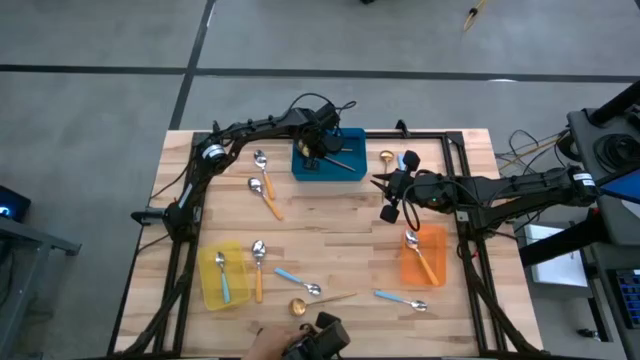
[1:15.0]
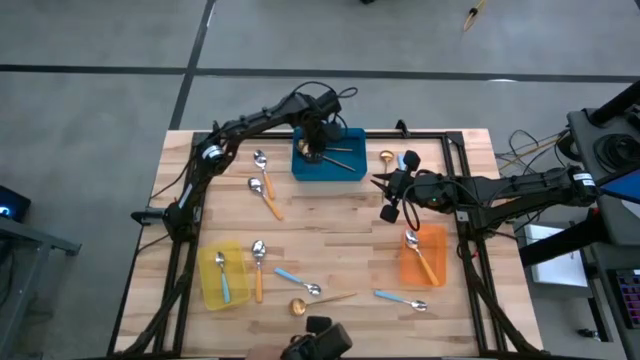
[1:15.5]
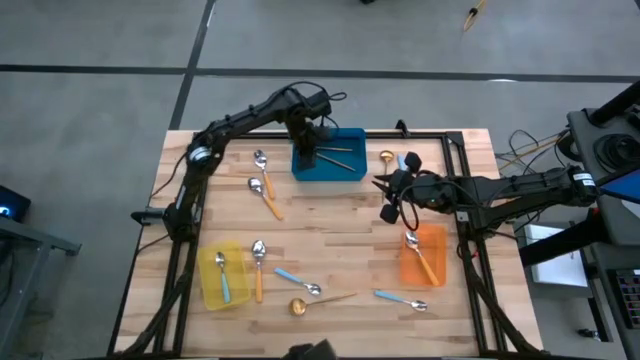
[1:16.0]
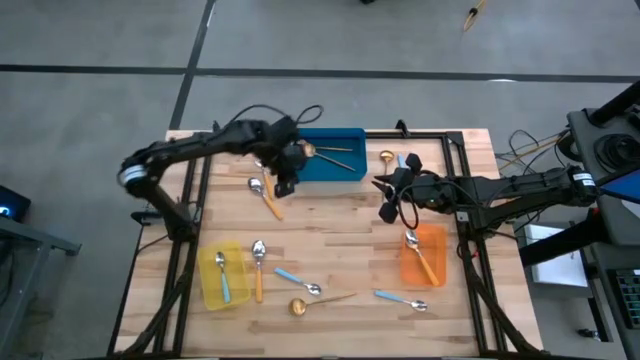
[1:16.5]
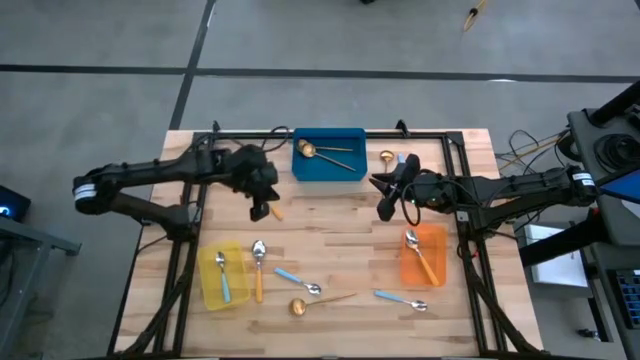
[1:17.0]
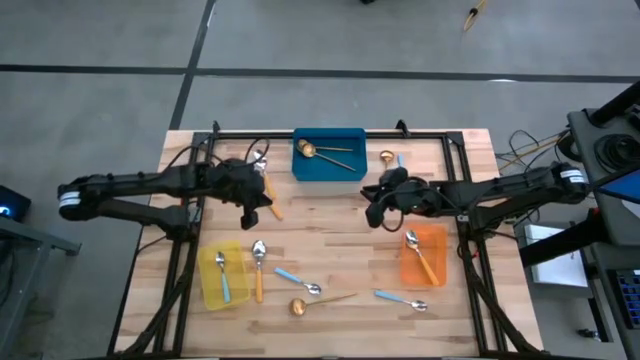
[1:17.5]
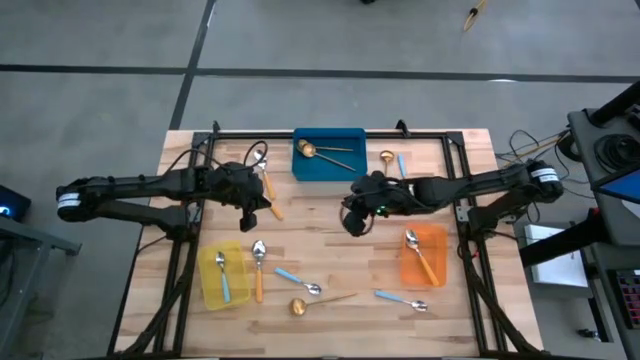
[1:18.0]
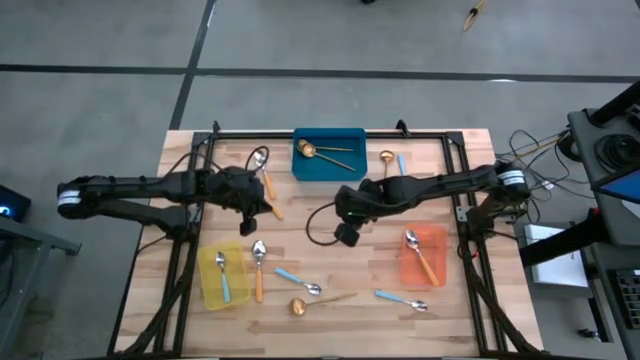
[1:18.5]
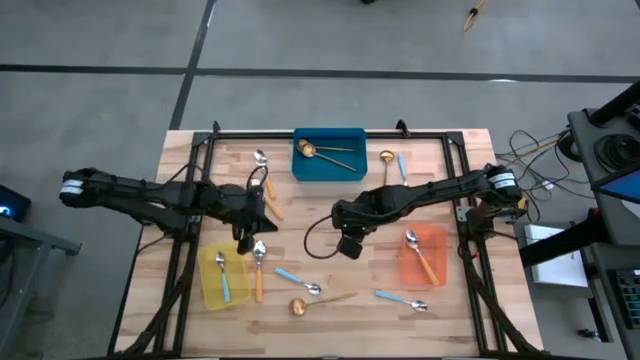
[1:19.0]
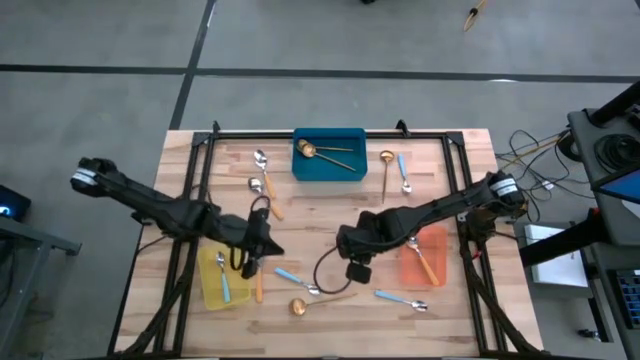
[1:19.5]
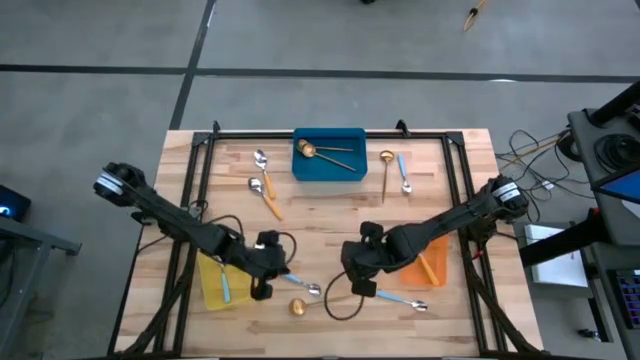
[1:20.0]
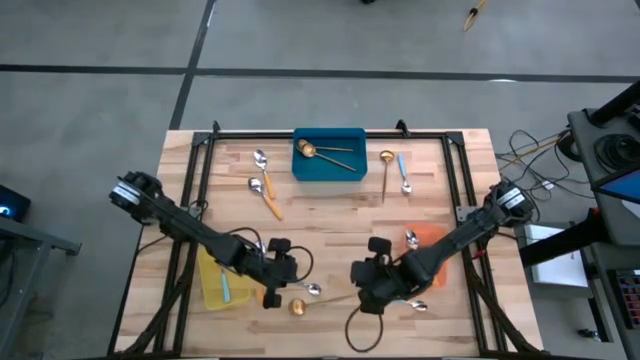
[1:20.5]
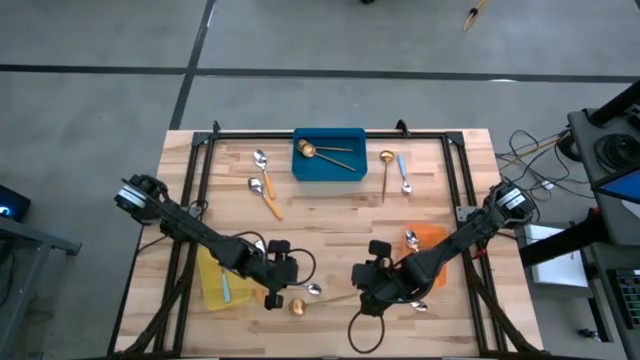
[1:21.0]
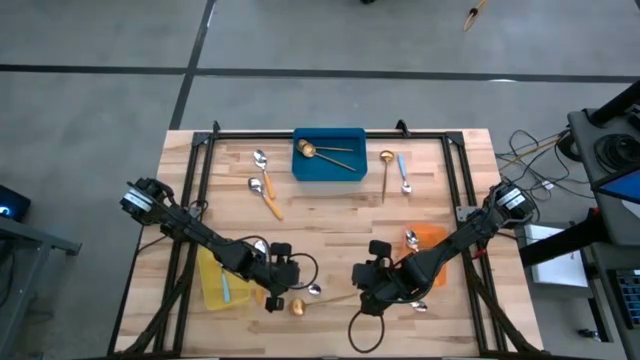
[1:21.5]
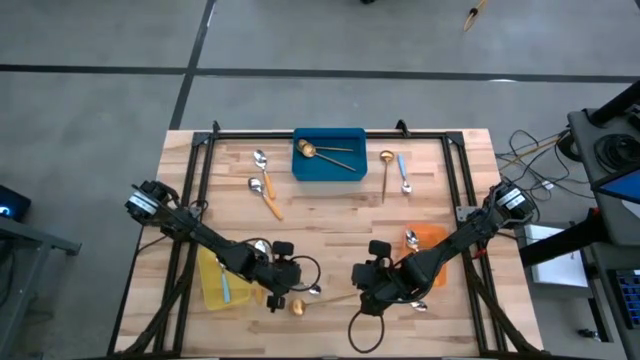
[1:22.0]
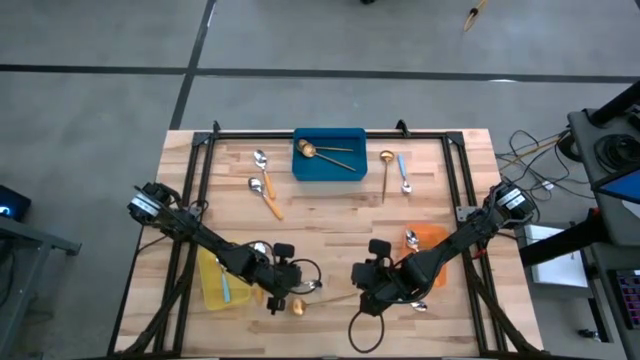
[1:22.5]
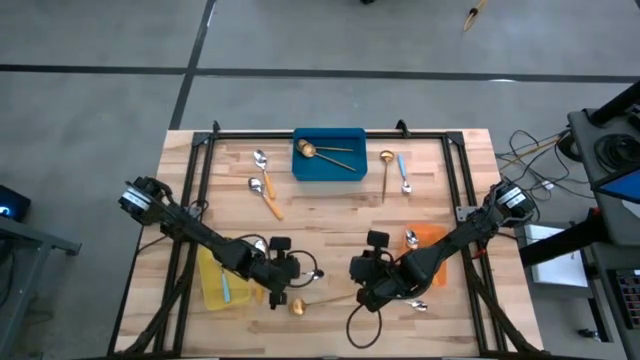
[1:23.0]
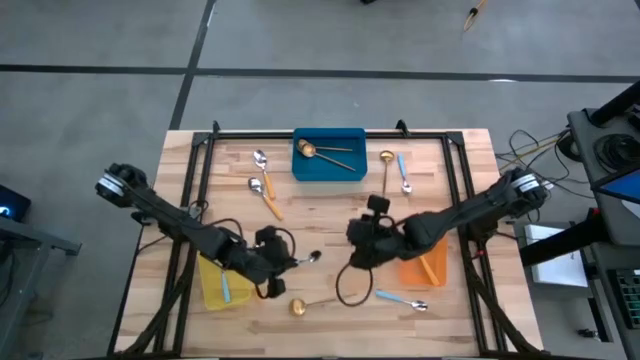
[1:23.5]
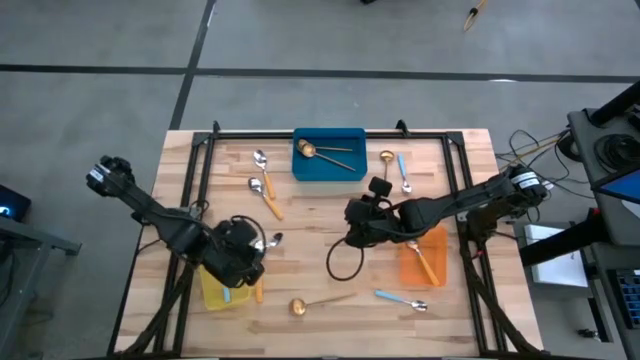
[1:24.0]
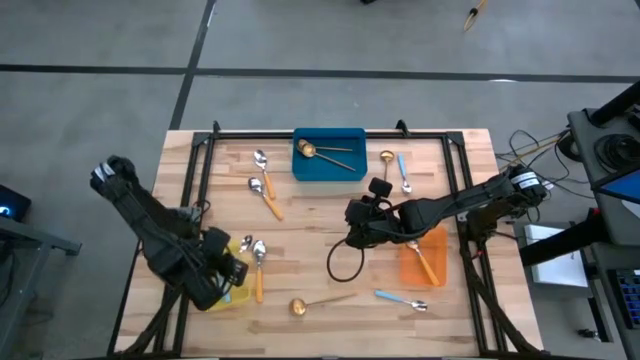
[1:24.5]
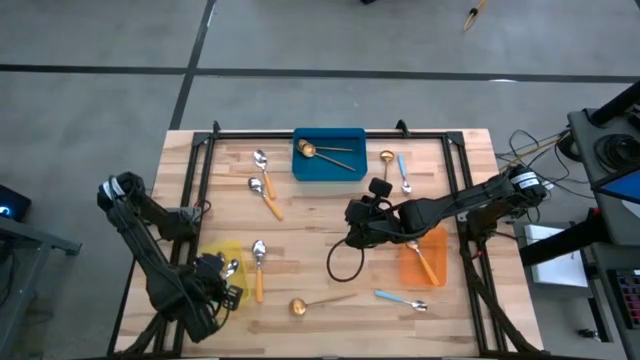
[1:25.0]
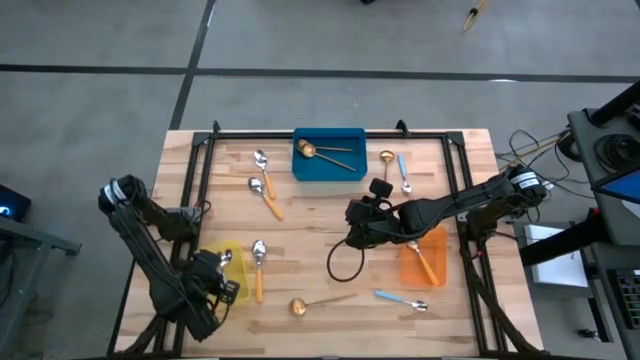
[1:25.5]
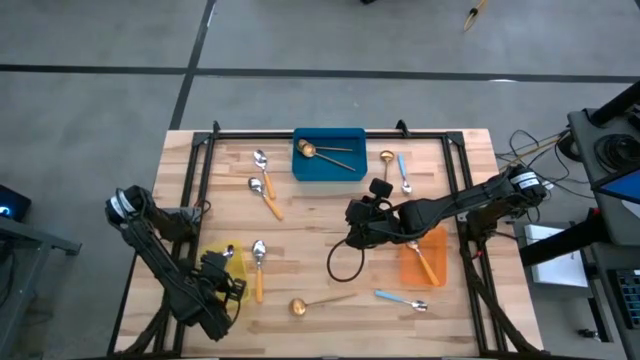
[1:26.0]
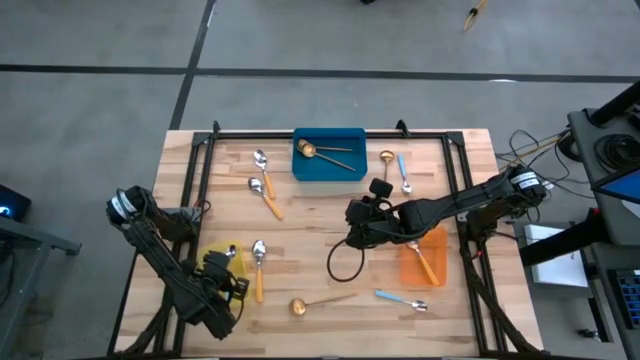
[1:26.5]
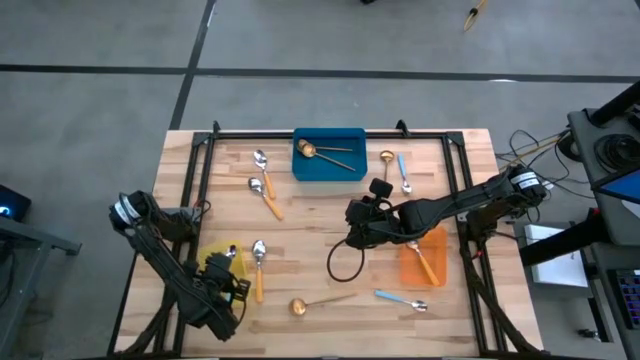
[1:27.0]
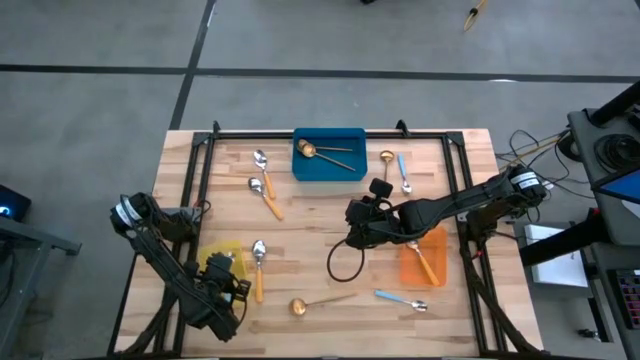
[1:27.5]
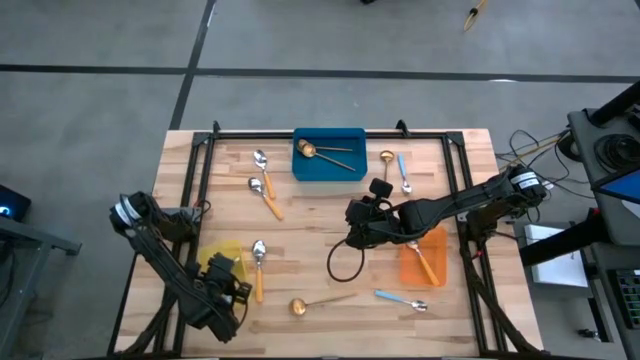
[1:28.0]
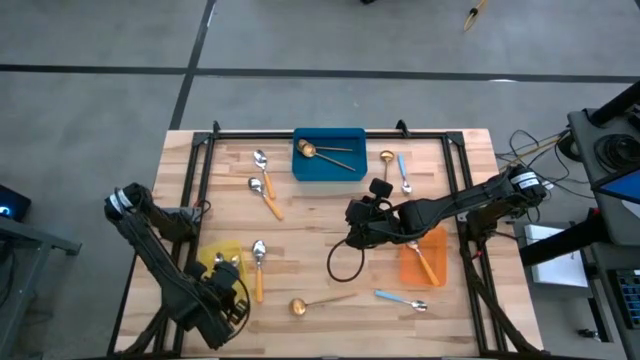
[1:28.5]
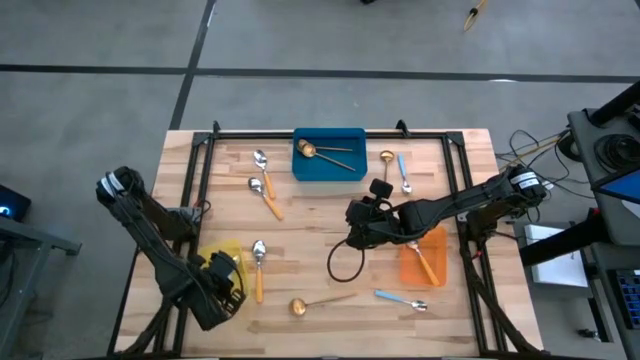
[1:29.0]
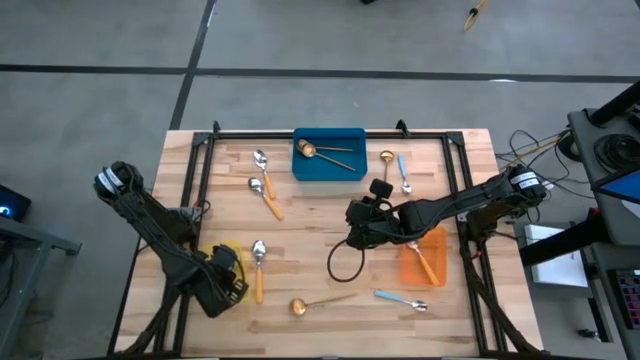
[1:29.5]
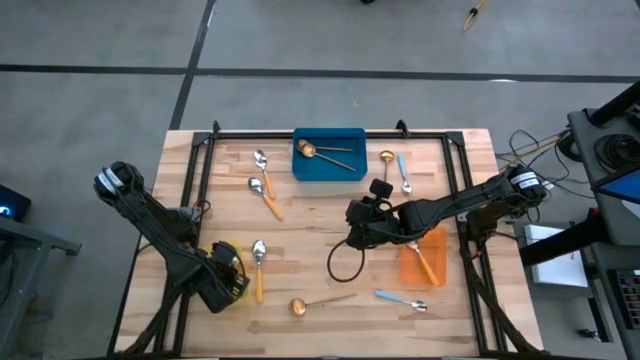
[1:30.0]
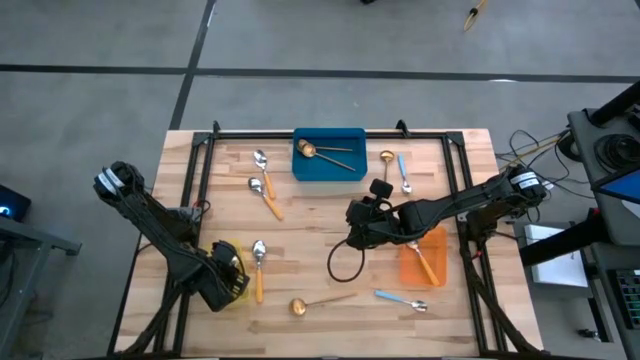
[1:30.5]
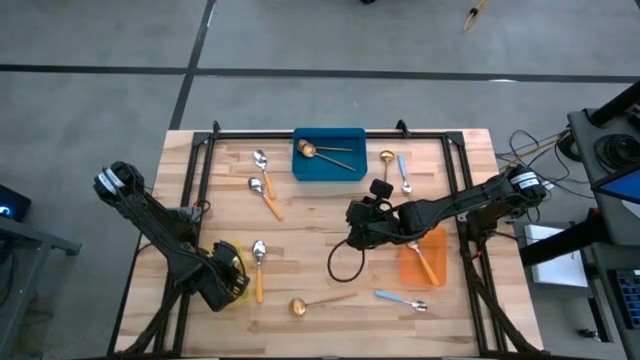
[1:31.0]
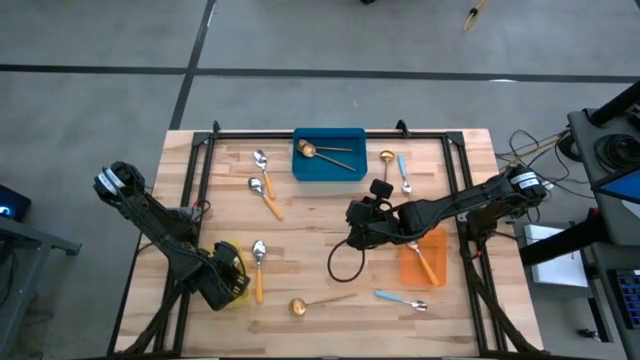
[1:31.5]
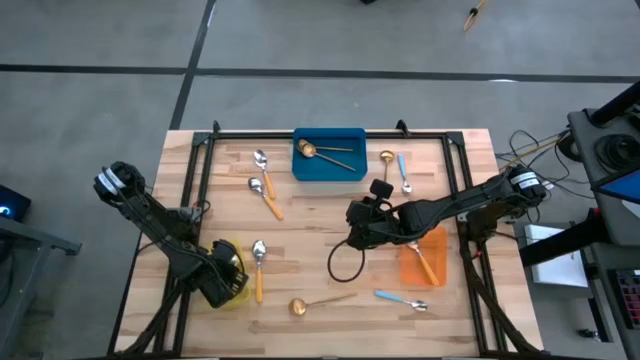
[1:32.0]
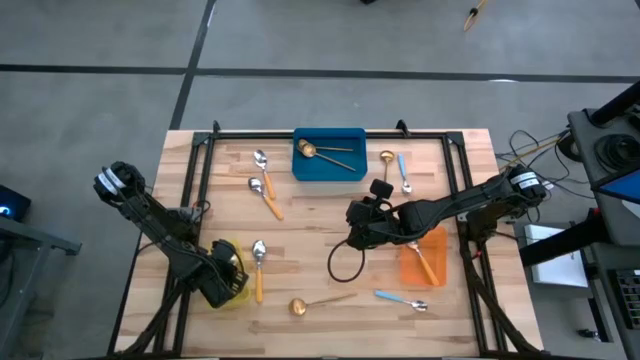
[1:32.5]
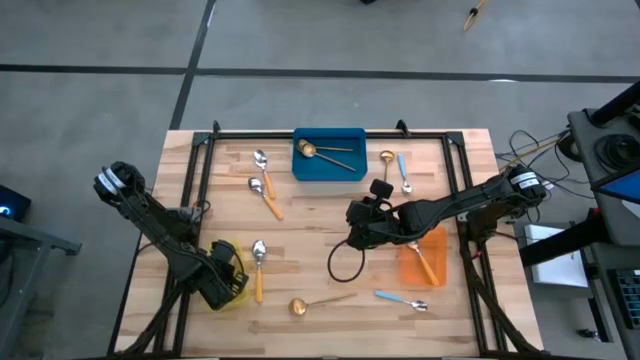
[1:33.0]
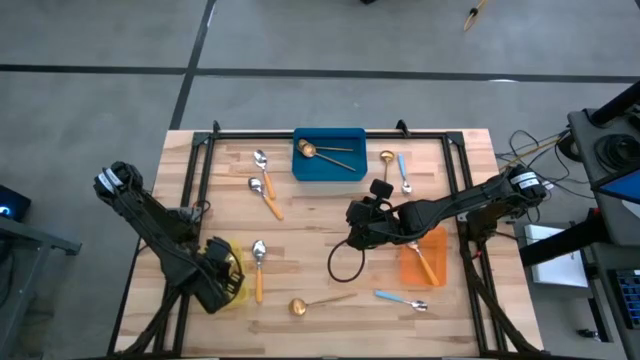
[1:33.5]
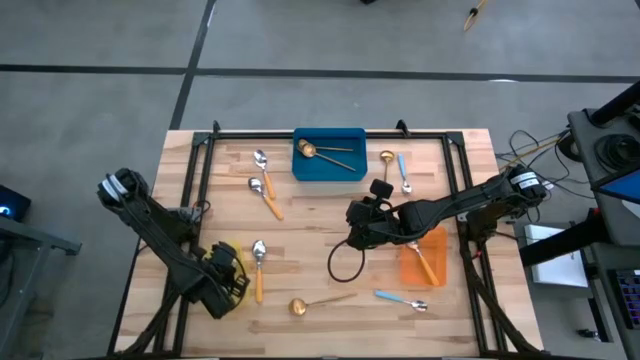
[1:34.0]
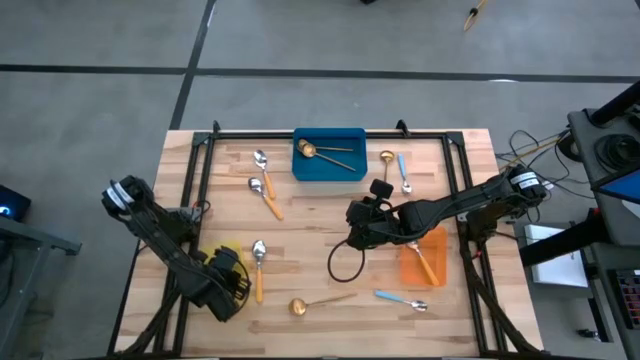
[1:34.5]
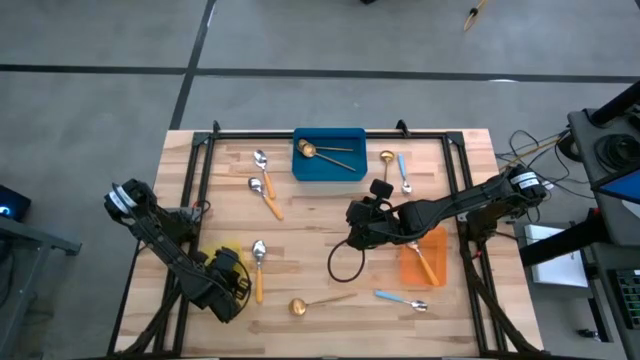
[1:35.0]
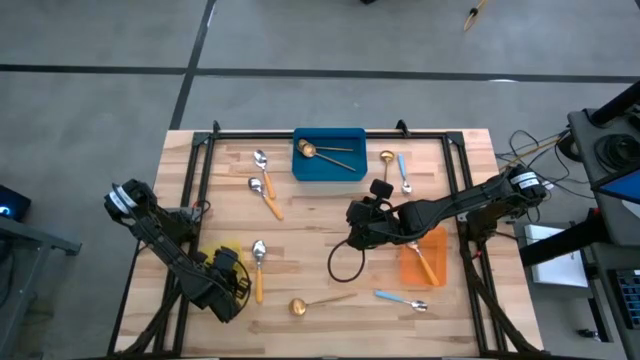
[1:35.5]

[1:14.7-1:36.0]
Task: Sort silverware by color (type)
Put the blue spoon into the yellow bin
